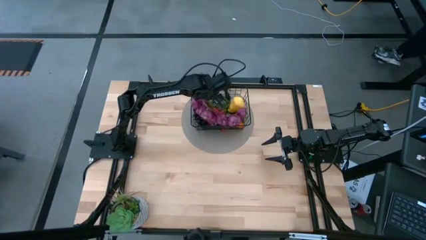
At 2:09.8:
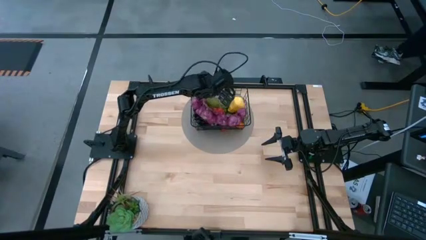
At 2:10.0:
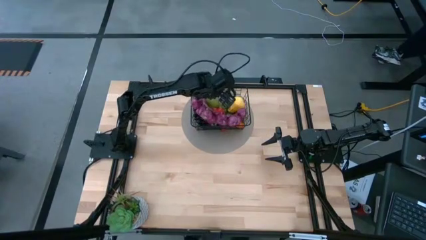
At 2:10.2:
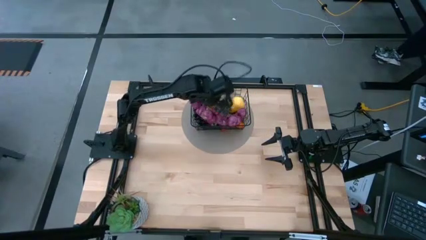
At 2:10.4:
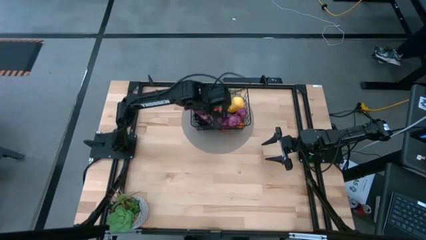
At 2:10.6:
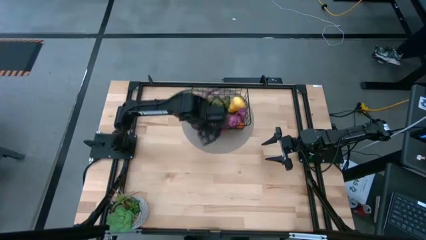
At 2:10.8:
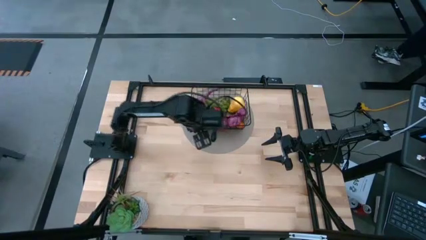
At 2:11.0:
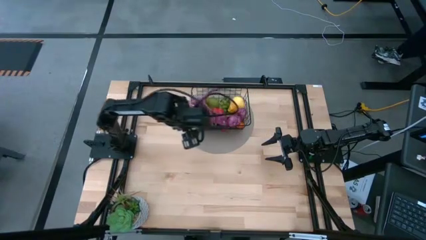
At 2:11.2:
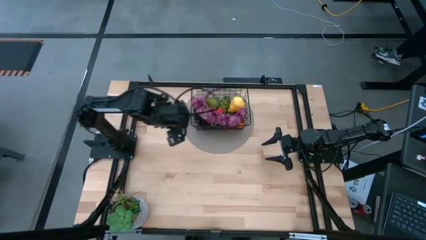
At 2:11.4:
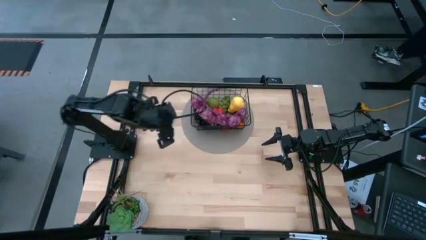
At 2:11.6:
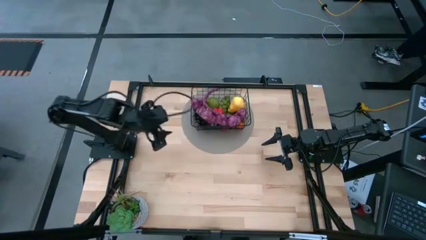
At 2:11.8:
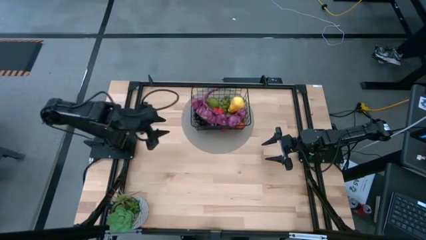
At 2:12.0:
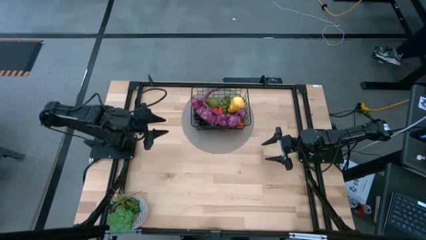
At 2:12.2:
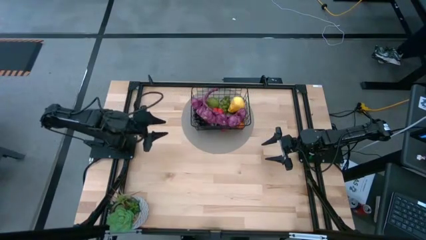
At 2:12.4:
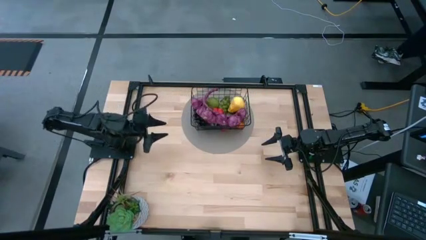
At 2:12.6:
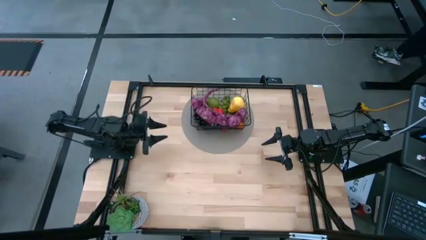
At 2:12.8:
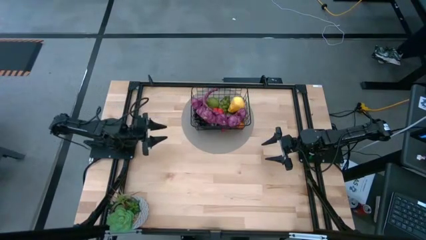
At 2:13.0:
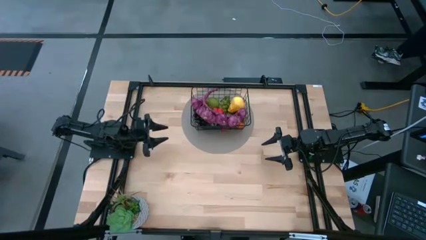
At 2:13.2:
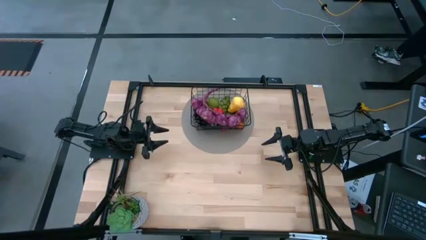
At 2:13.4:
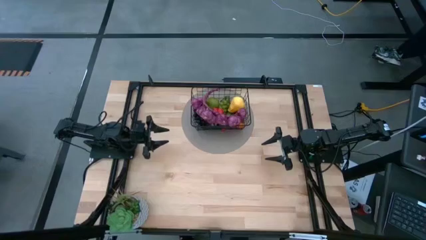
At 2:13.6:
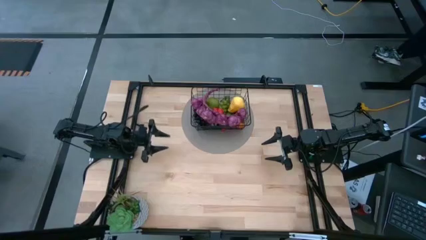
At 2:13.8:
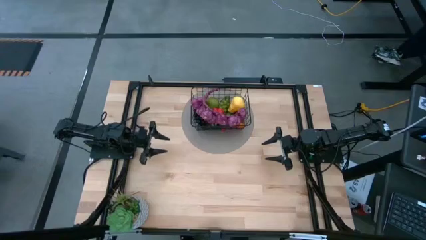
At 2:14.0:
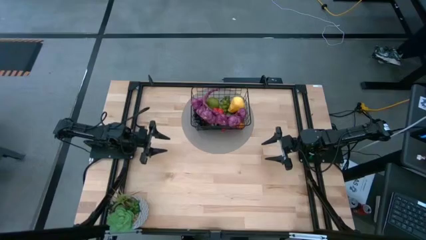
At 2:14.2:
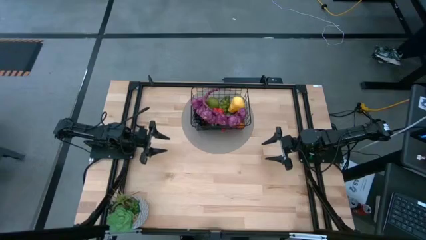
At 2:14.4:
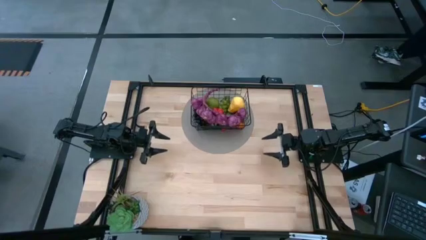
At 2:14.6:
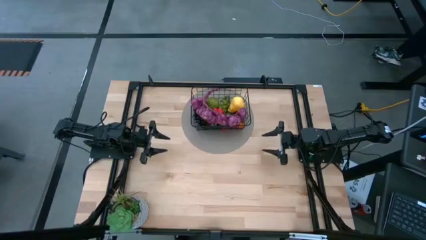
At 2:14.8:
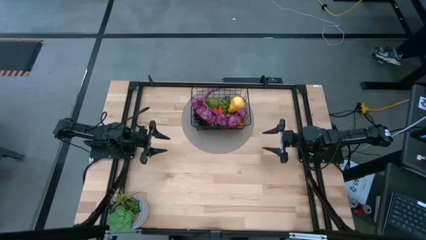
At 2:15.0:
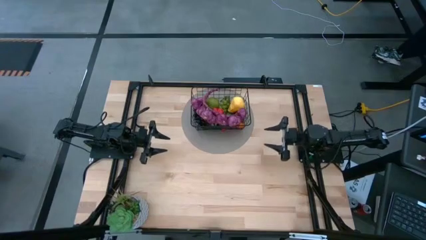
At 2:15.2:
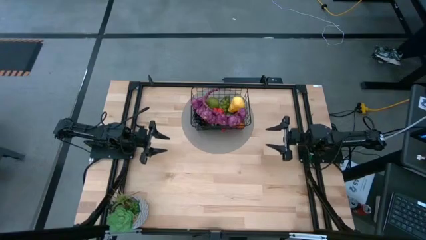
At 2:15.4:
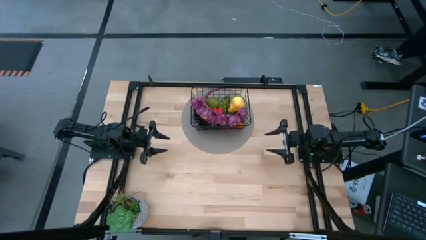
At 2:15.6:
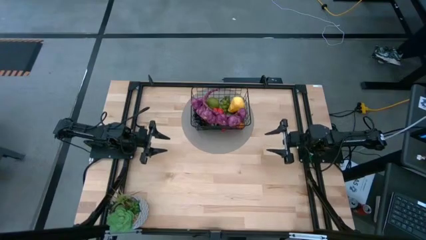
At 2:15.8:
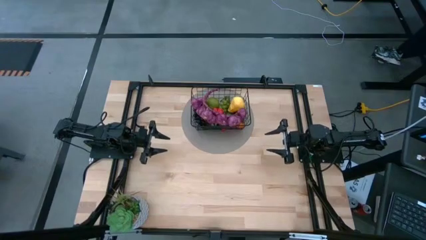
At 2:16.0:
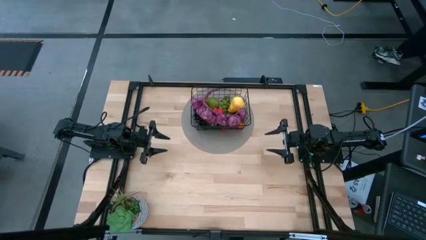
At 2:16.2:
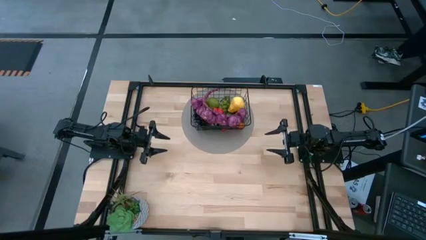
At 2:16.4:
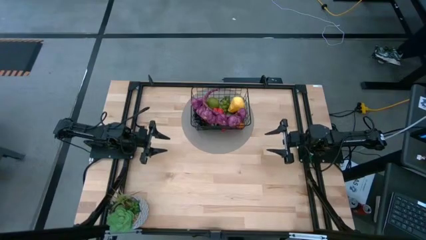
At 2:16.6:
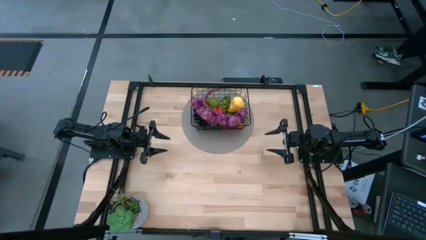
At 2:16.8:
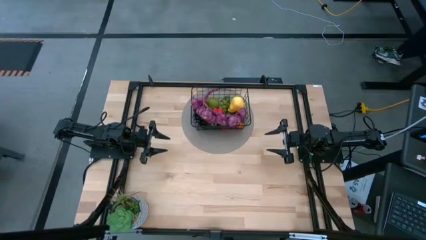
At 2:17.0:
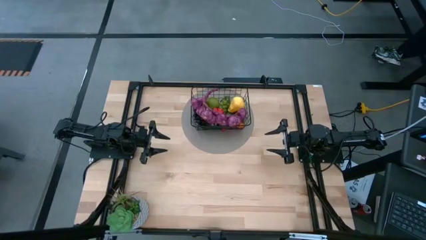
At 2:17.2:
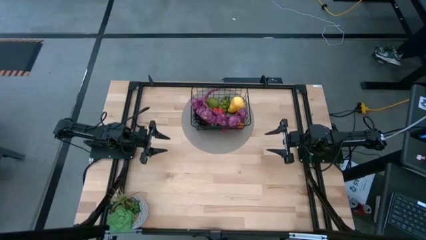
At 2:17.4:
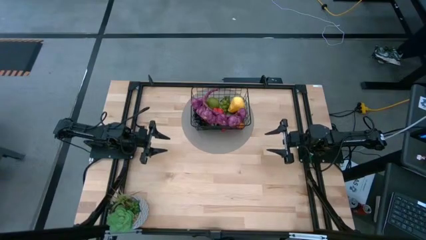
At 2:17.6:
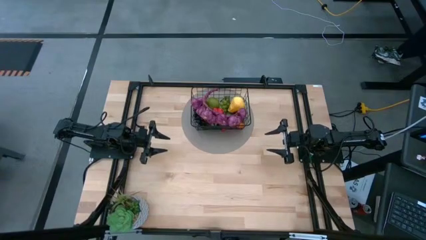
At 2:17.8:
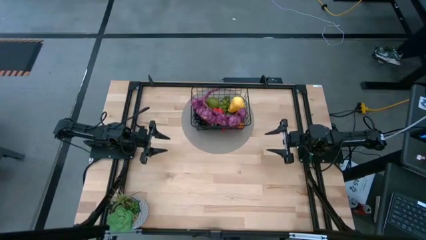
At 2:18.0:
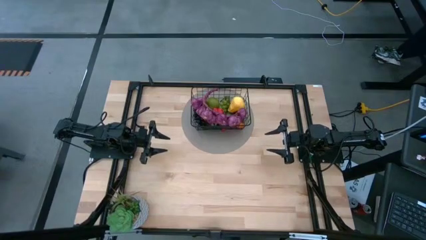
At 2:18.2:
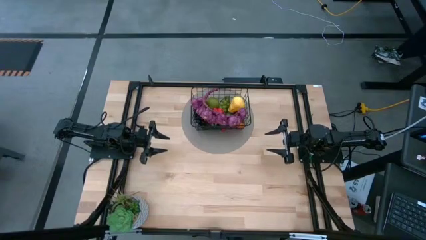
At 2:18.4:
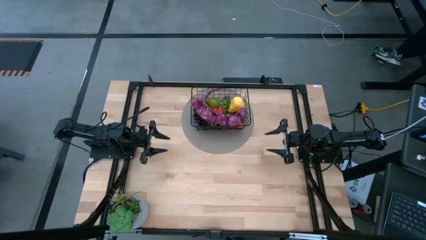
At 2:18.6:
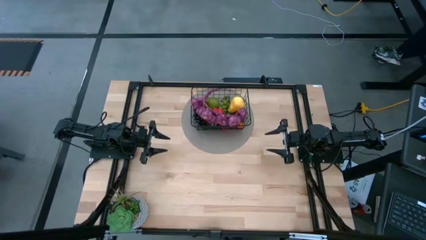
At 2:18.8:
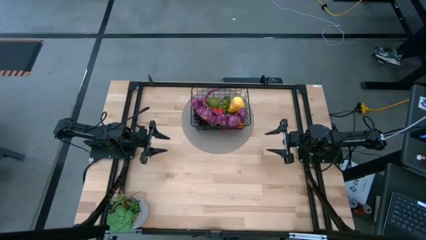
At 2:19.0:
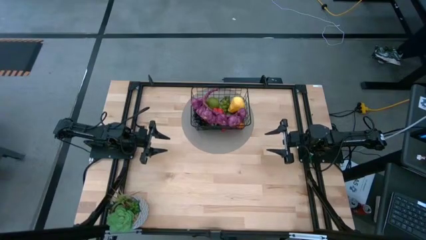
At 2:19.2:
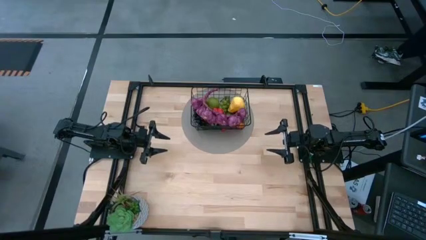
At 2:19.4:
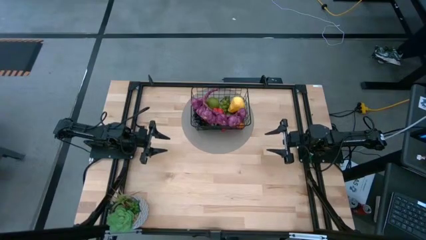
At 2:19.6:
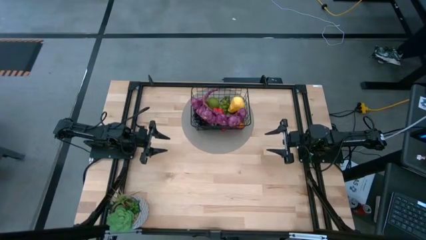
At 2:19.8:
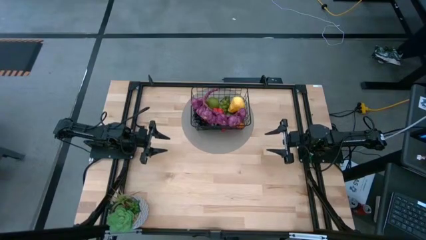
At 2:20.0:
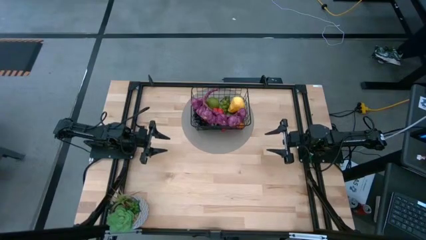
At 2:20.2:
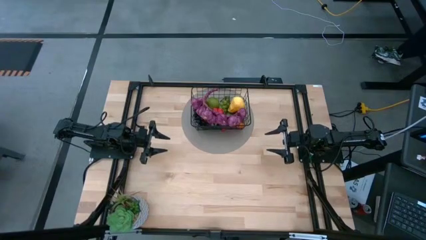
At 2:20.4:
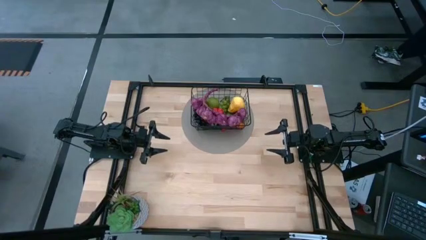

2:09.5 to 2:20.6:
Task: Build produce basket
Return to Home Position

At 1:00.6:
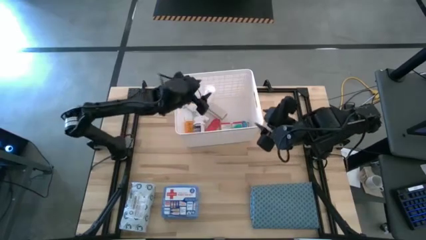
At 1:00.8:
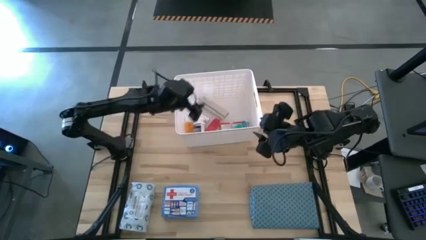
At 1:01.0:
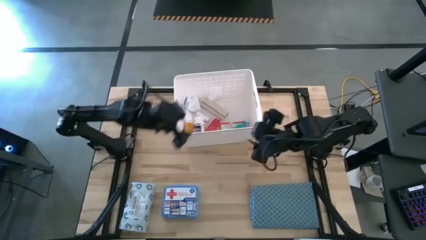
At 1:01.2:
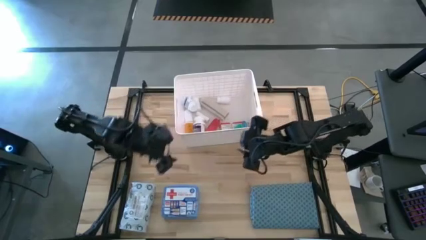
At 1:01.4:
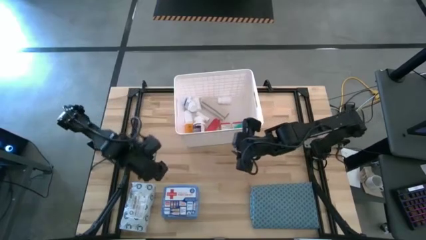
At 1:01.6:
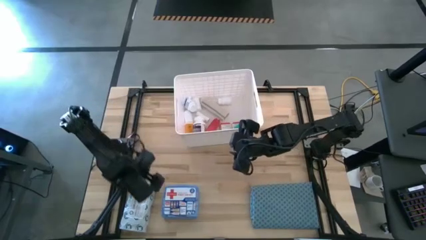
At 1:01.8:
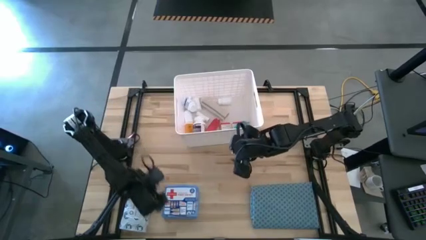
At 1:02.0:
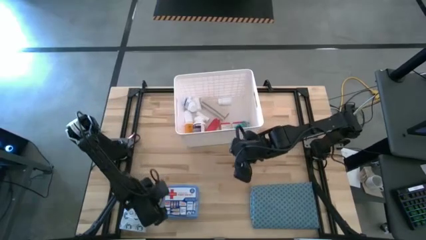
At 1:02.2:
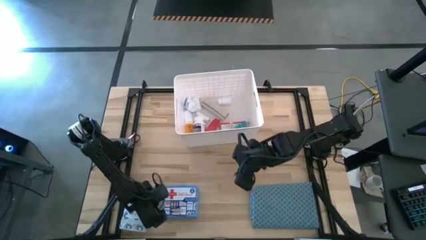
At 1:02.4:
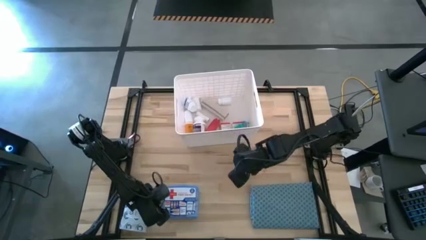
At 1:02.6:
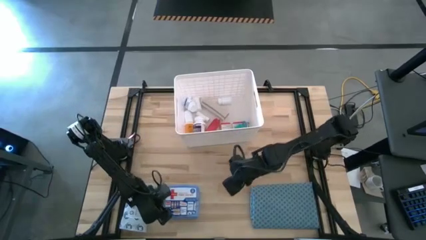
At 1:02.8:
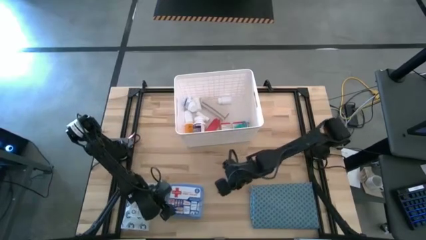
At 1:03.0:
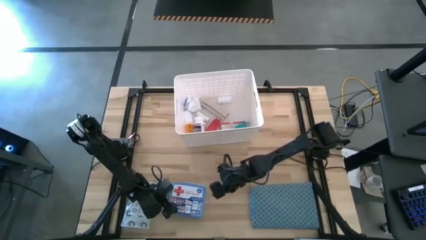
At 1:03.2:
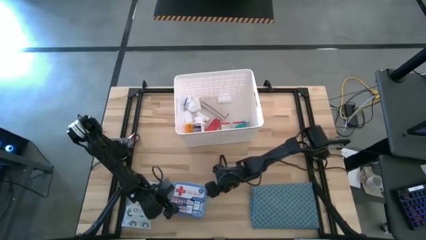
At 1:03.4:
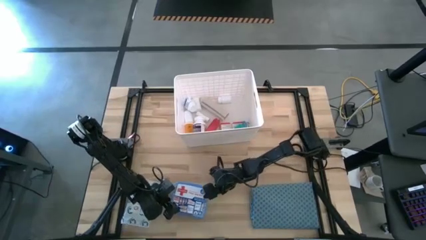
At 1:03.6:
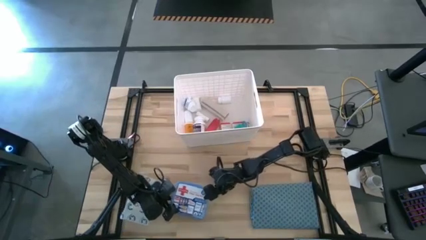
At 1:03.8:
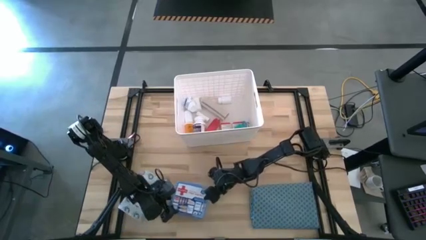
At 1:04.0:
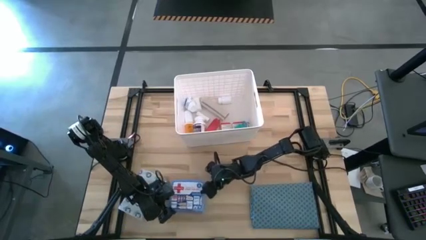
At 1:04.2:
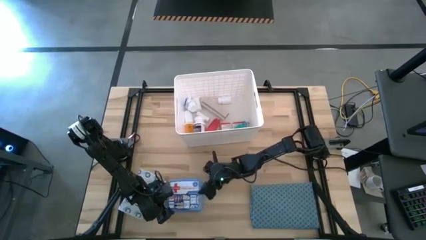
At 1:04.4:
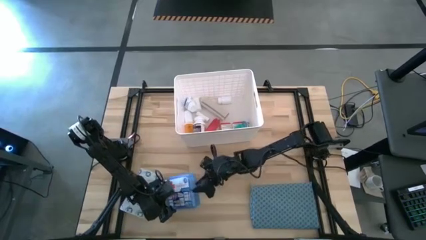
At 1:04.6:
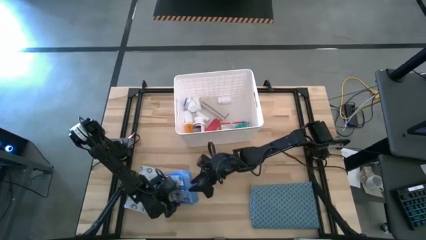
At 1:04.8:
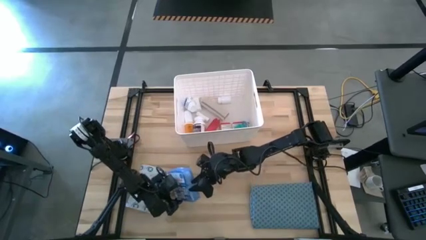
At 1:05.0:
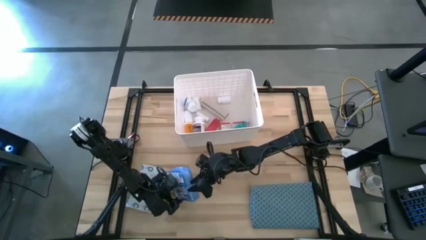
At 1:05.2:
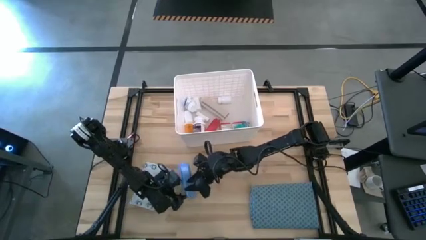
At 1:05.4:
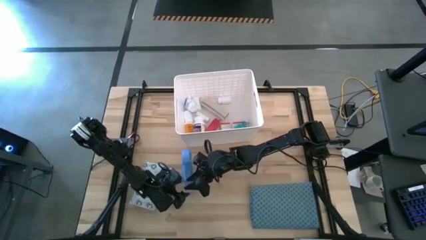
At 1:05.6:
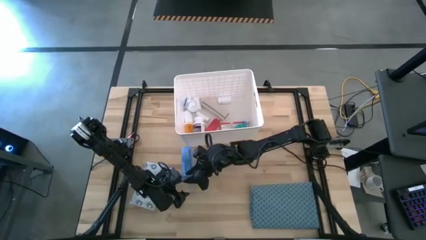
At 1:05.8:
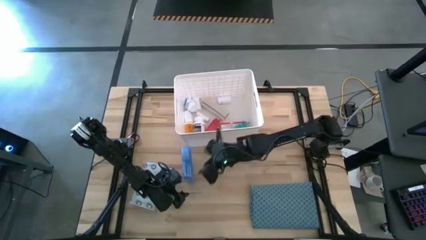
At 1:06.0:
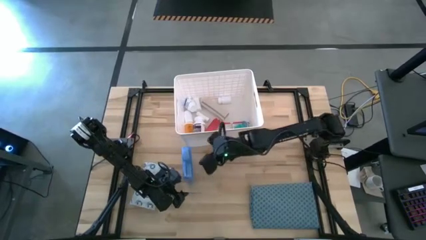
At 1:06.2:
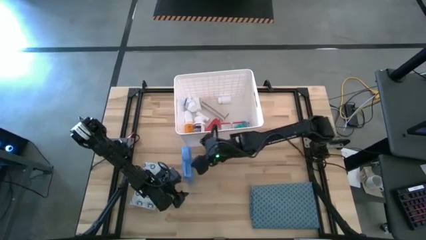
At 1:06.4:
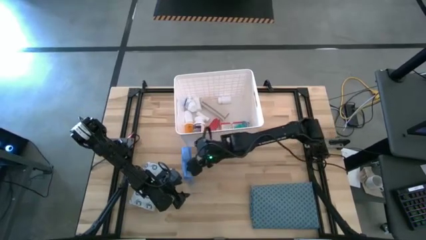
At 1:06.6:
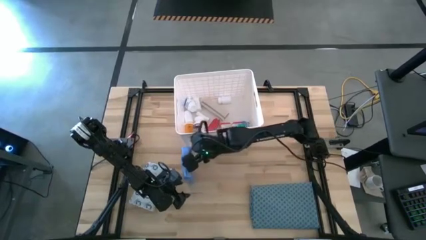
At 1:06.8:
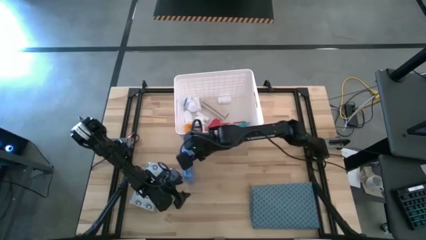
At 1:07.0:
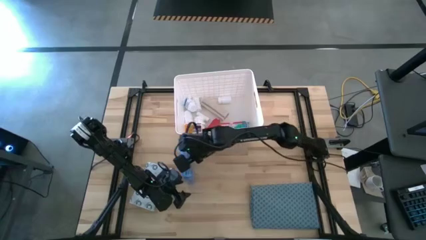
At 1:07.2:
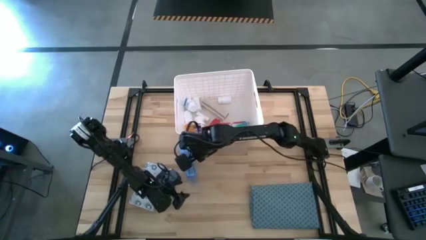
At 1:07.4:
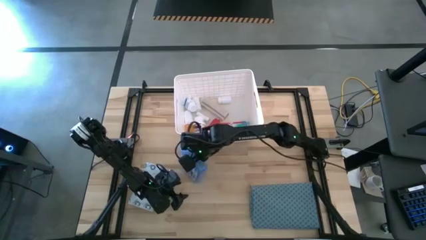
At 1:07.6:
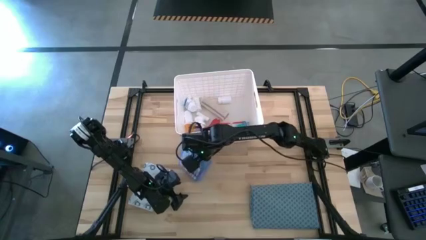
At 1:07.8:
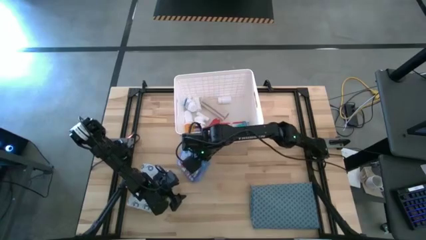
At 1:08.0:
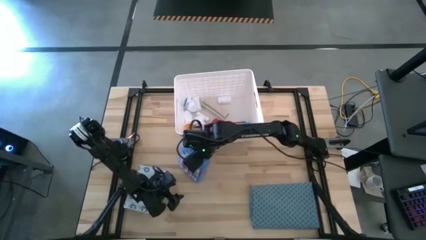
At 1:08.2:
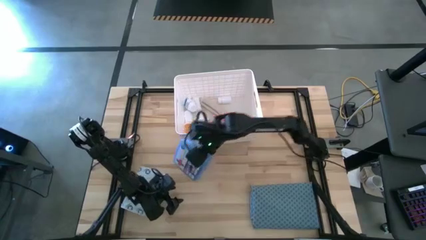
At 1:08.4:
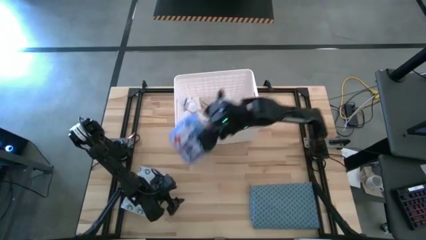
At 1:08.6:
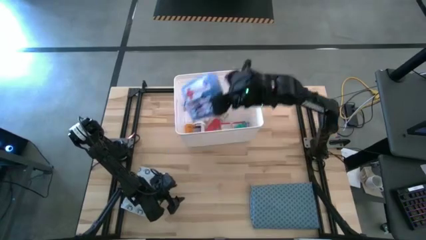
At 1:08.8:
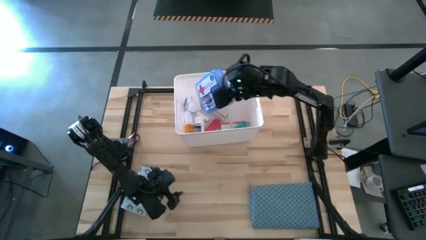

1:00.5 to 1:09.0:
Task: Pick & place medical supplies in basket/bin
Put the blue first aid kit into the white bin
